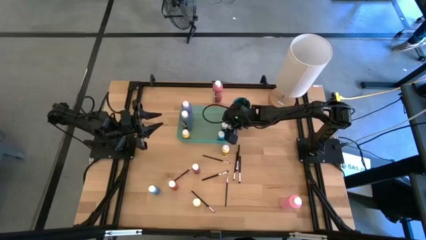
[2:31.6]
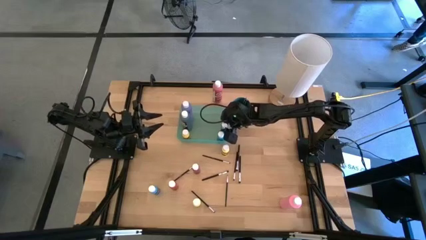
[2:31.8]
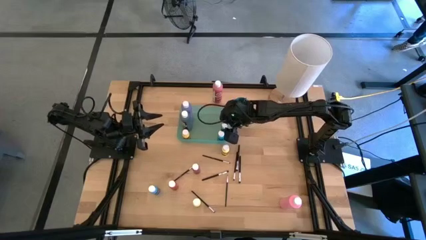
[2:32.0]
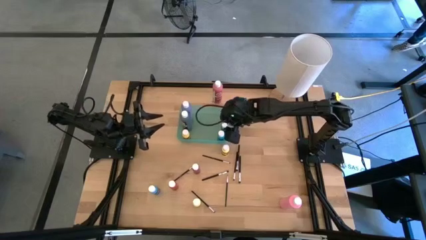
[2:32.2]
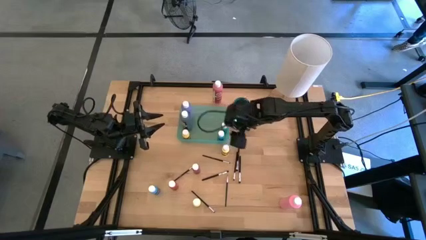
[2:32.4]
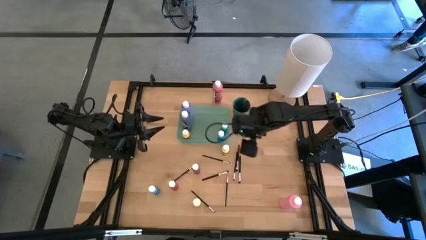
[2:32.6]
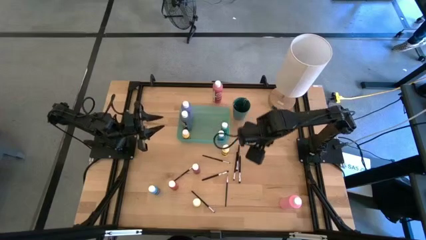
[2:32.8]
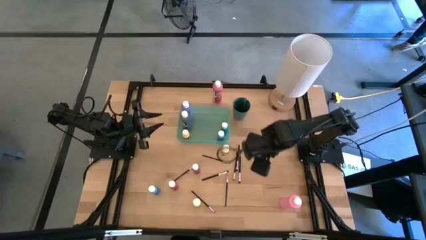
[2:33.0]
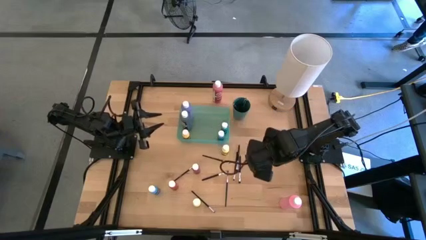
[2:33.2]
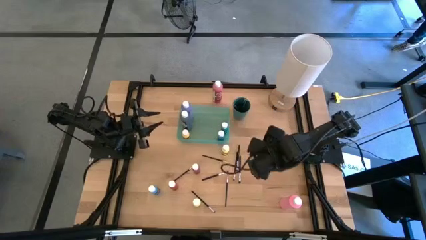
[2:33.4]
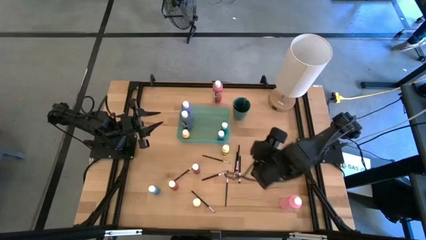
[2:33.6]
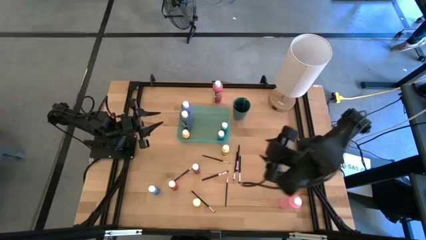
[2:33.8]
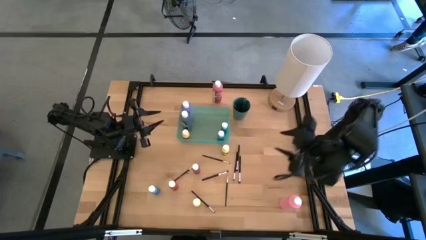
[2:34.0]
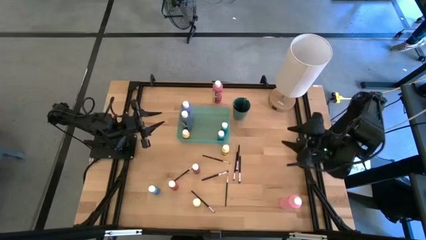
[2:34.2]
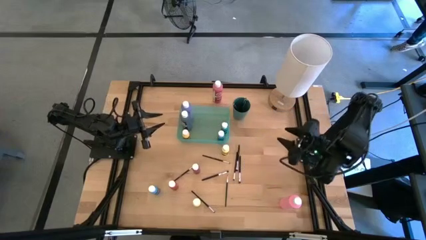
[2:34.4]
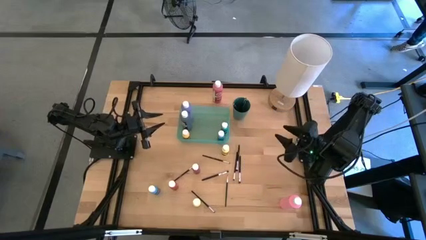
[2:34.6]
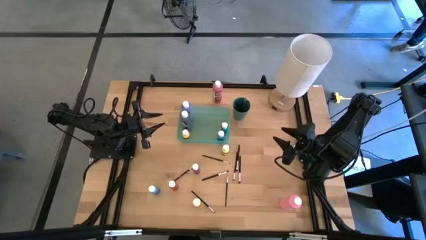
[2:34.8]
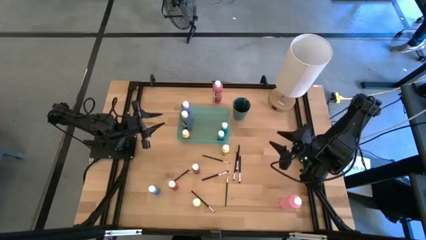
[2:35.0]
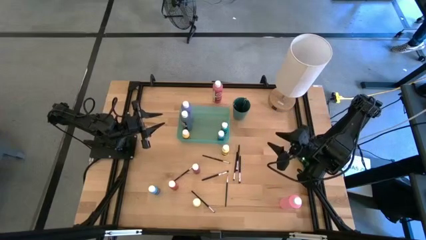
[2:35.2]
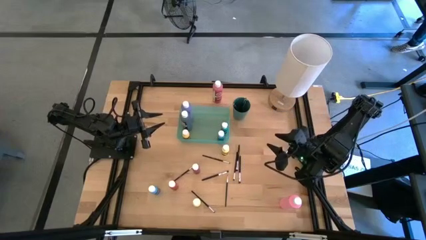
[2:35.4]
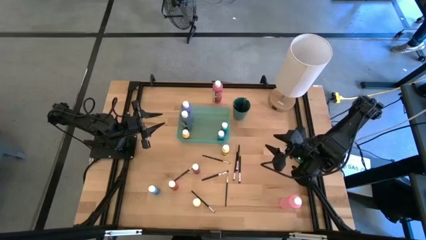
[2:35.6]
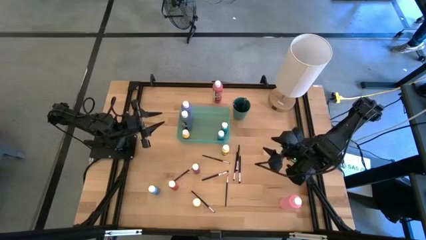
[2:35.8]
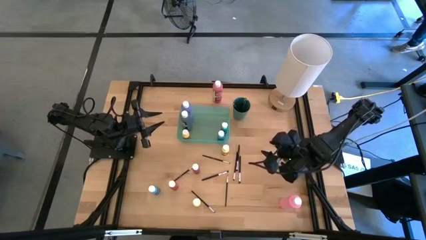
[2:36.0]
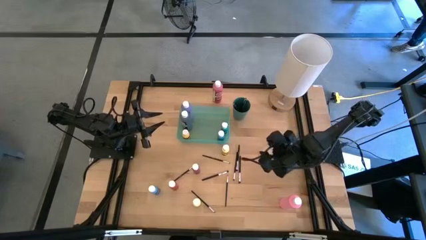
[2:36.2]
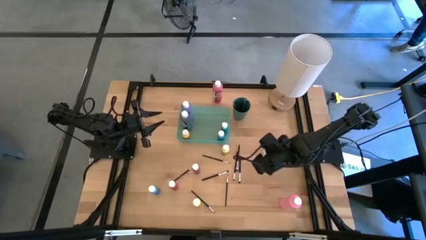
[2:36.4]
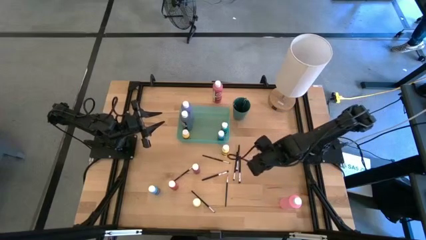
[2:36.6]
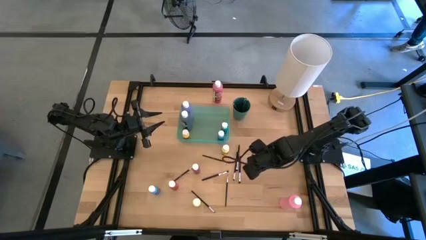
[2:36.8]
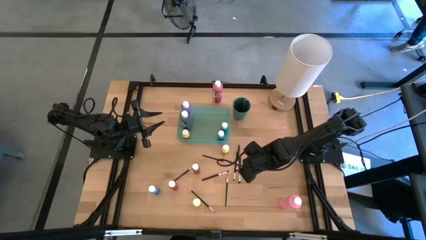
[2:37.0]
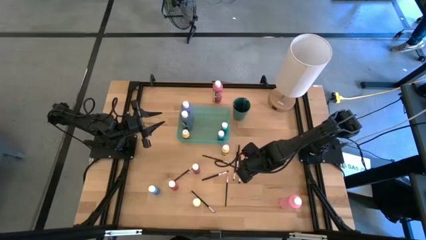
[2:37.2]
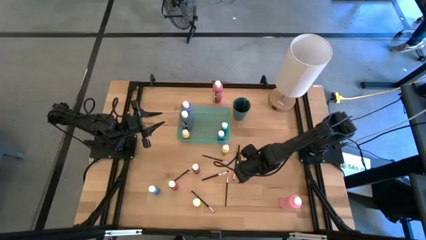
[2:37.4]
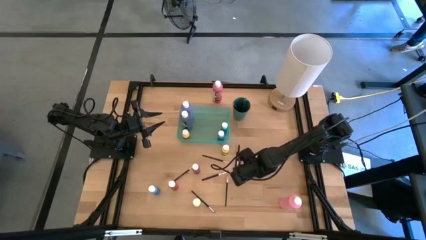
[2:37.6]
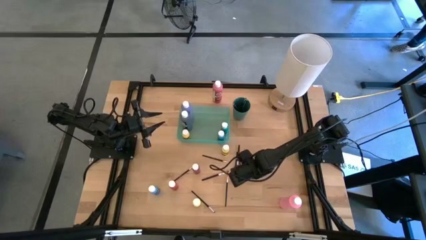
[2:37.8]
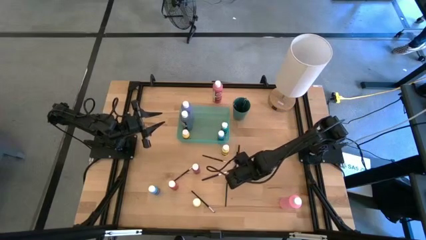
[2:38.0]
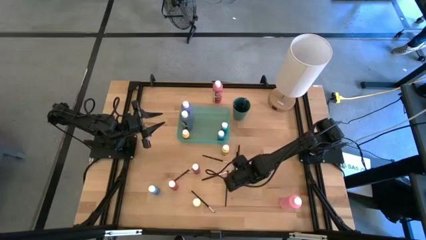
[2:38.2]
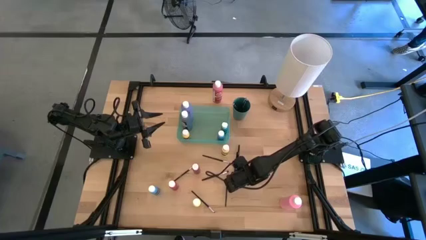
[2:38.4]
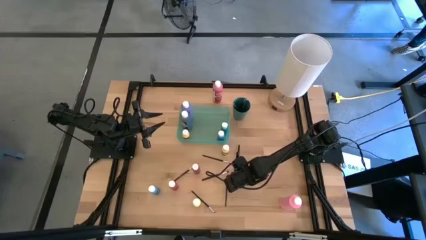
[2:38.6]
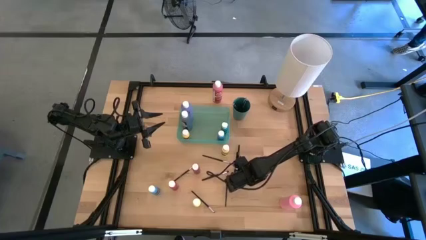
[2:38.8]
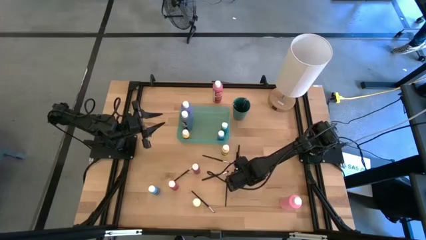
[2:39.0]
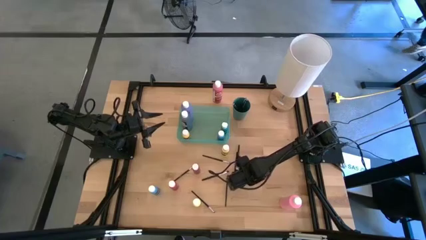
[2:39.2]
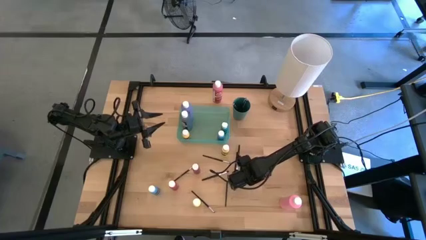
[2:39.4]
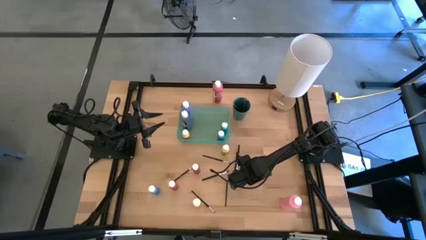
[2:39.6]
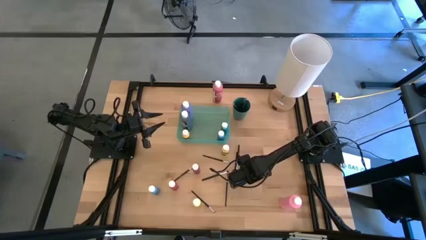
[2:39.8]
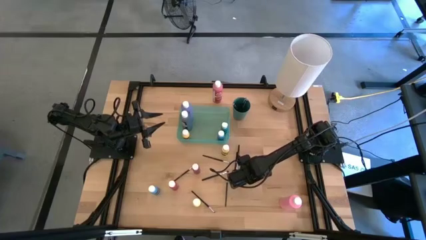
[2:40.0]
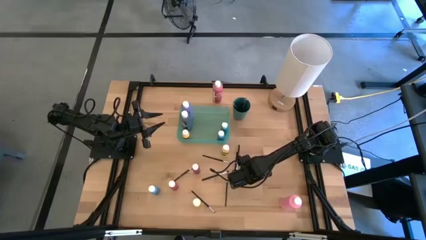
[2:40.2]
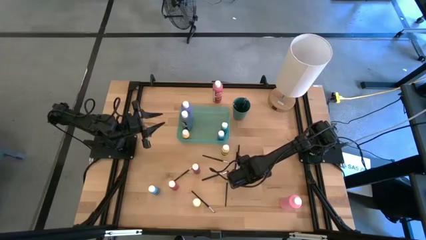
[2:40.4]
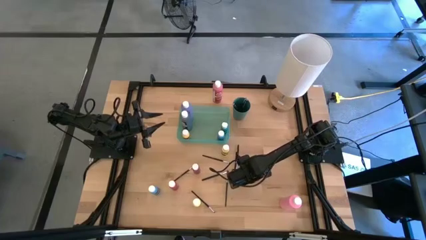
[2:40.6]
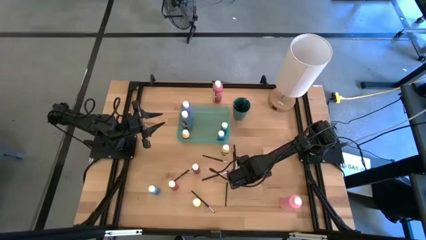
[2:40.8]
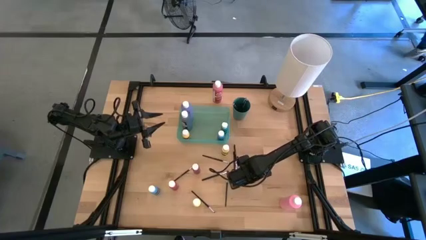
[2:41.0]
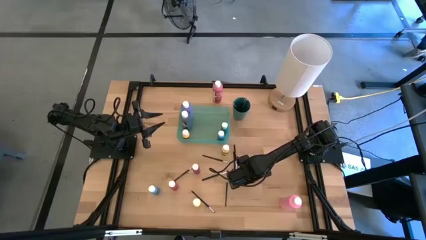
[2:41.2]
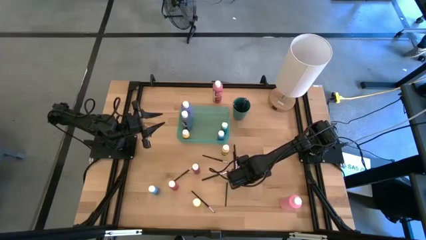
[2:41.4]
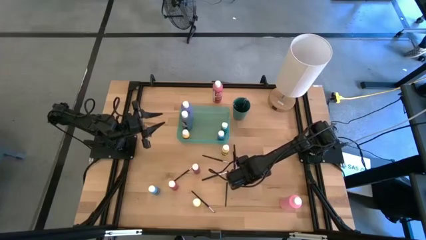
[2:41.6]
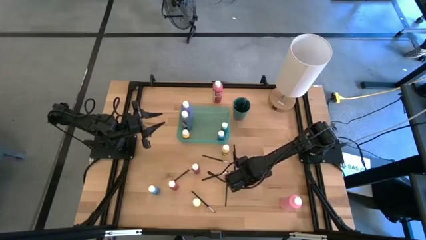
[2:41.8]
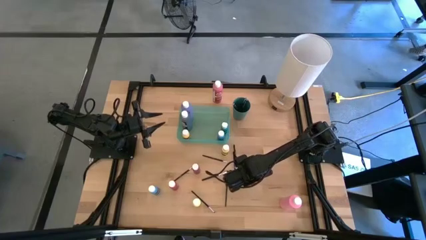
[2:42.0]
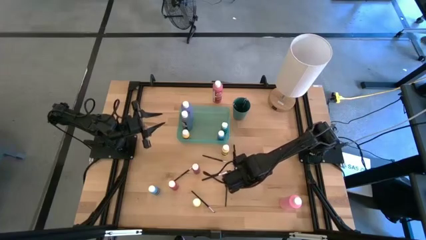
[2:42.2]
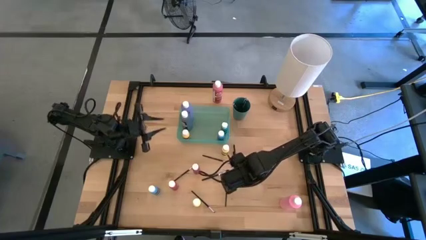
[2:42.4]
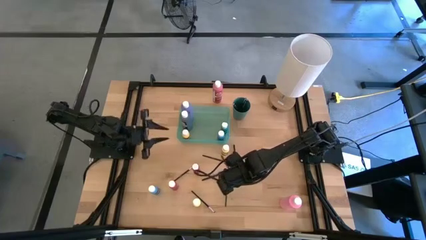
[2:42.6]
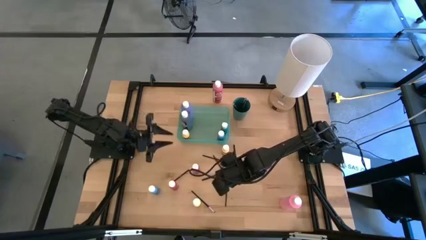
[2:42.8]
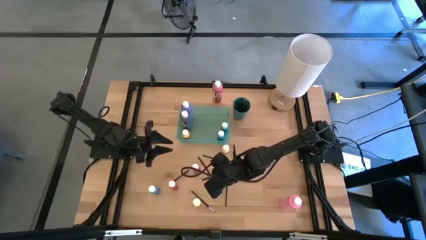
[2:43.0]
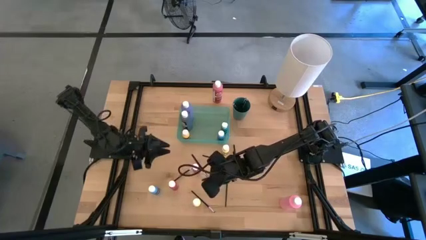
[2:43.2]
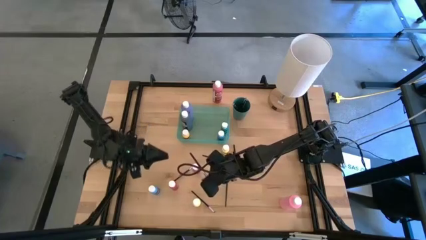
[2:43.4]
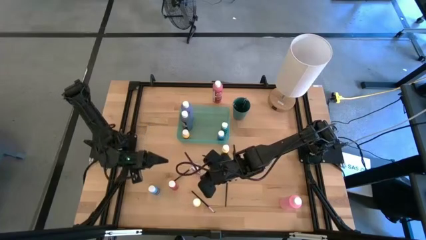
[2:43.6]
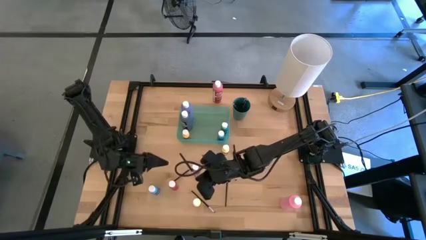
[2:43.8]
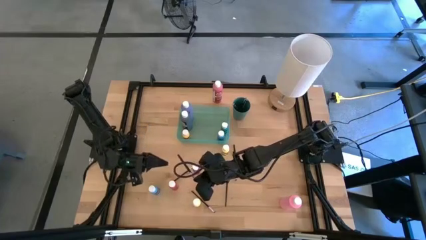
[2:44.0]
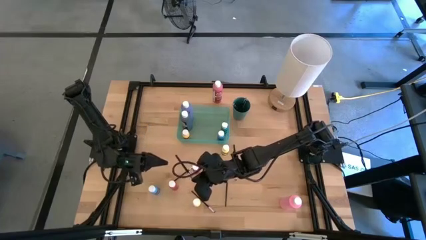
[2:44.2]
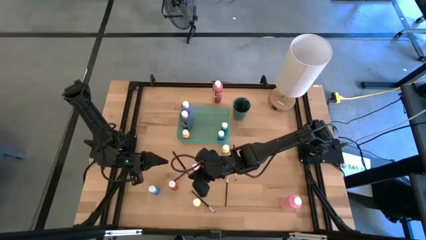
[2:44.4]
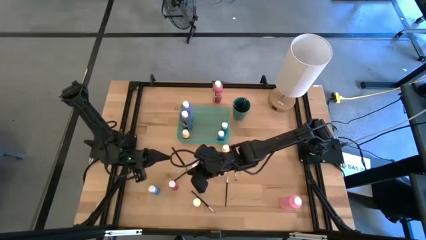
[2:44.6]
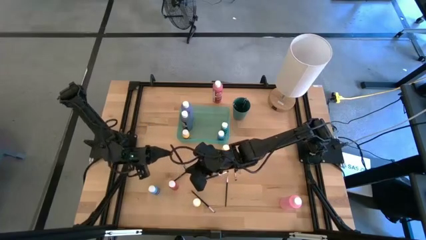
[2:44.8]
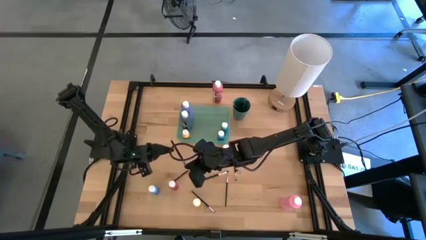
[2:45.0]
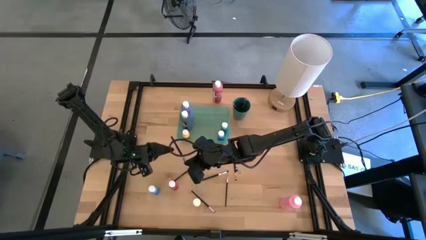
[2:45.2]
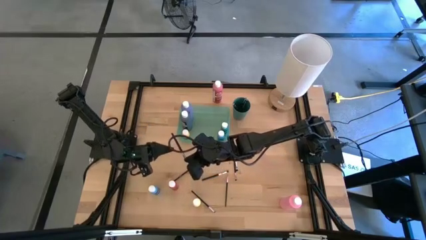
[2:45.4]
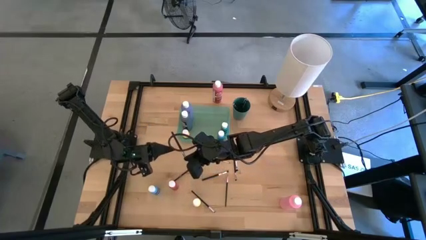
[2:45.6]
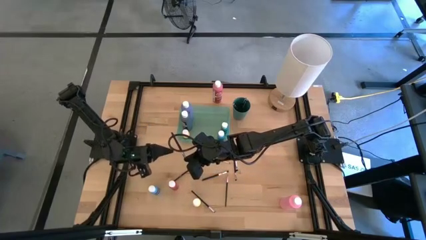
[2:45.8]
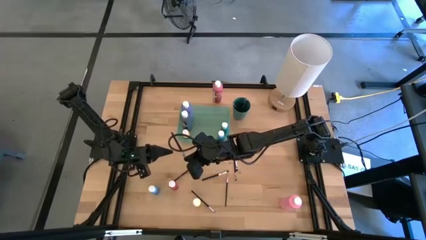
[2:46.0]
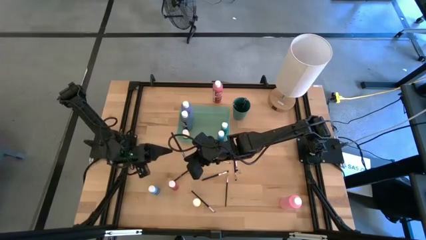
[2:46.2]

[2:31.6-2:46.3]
Task: Pick & Place Paint Supplies
Put the black paint brush into the dark green cup
